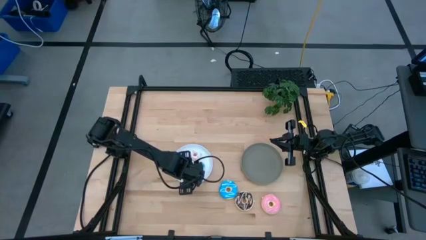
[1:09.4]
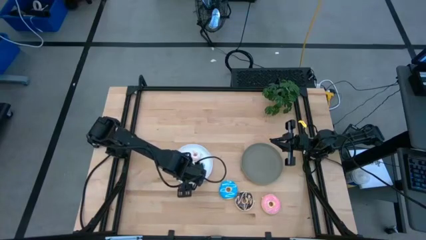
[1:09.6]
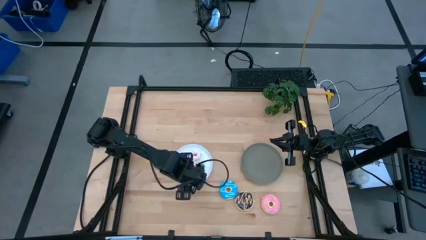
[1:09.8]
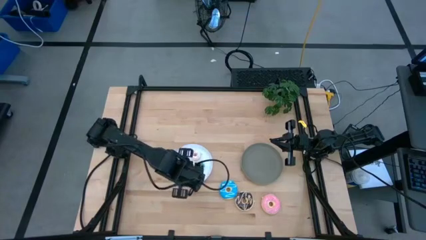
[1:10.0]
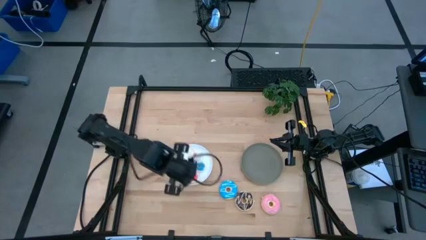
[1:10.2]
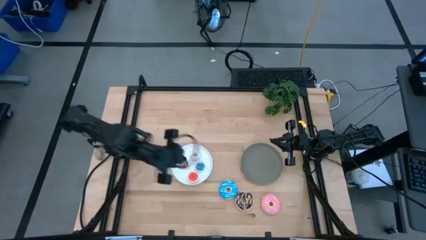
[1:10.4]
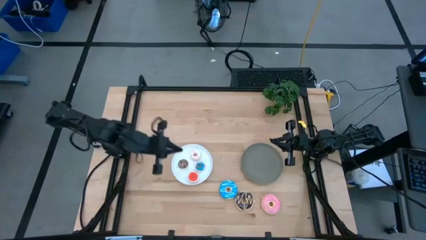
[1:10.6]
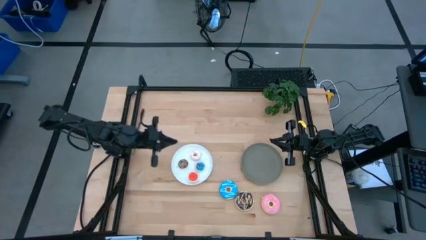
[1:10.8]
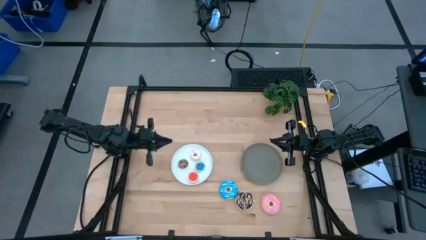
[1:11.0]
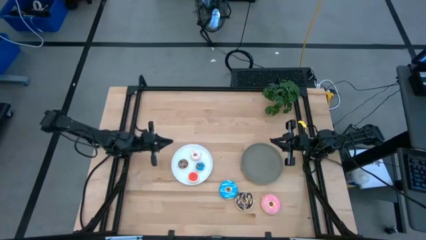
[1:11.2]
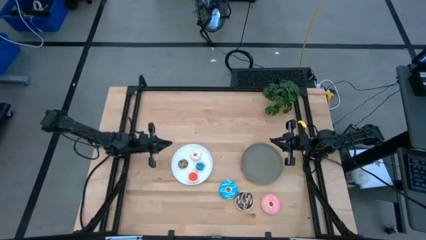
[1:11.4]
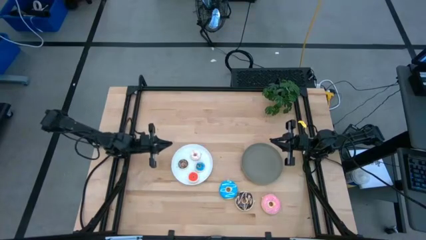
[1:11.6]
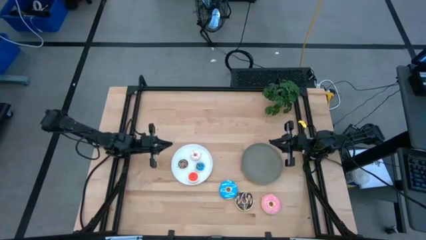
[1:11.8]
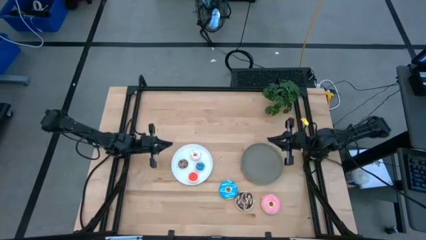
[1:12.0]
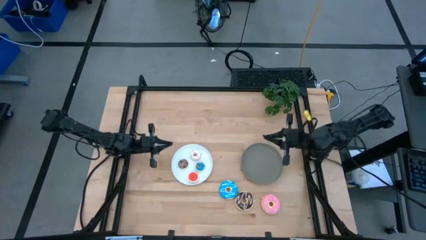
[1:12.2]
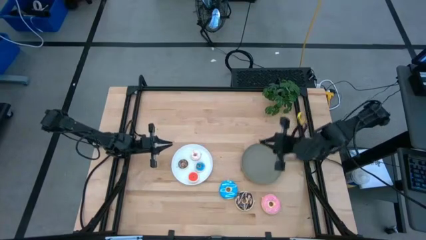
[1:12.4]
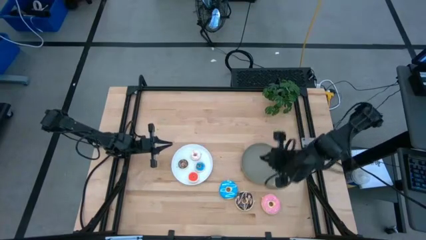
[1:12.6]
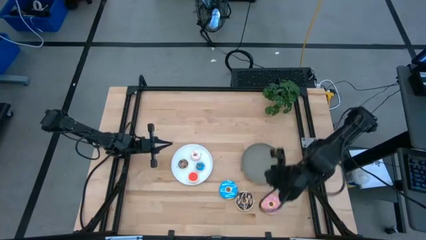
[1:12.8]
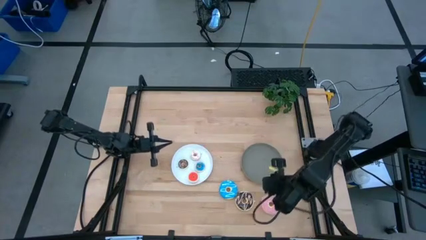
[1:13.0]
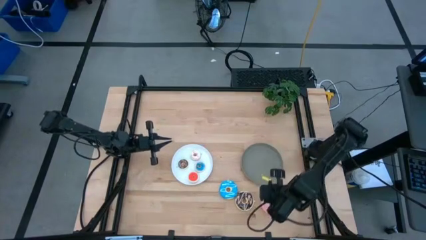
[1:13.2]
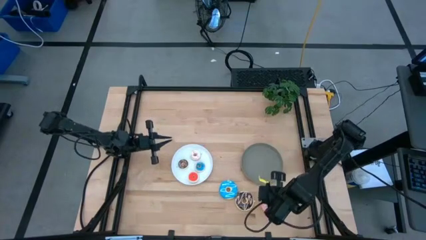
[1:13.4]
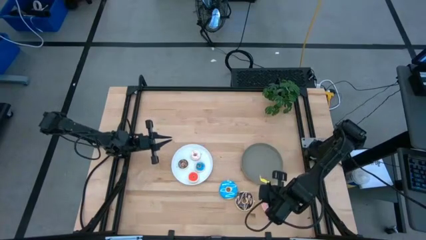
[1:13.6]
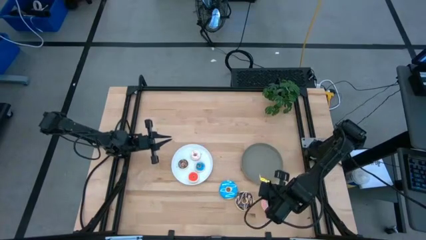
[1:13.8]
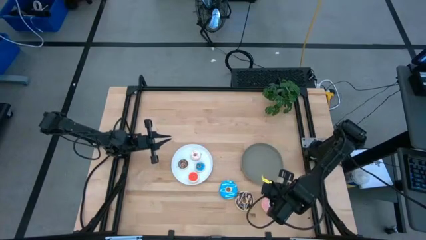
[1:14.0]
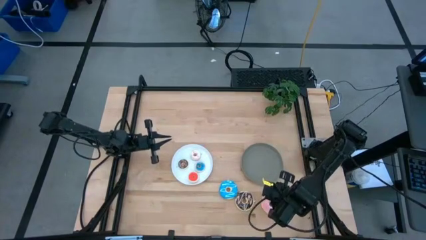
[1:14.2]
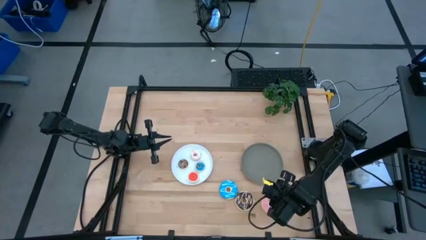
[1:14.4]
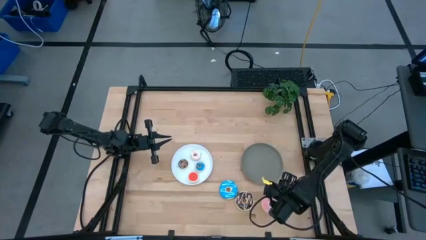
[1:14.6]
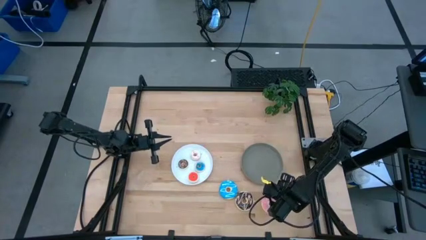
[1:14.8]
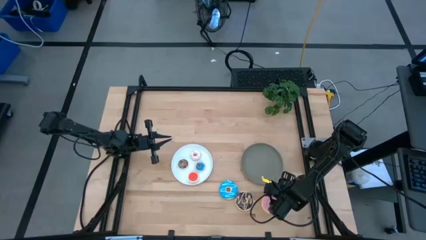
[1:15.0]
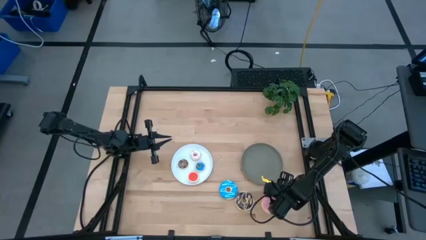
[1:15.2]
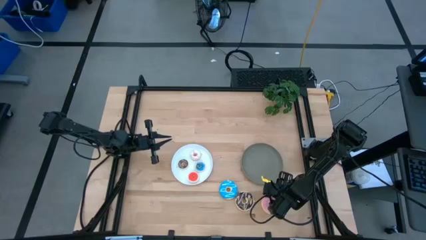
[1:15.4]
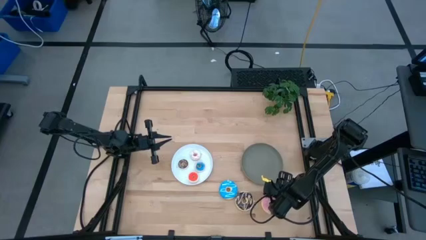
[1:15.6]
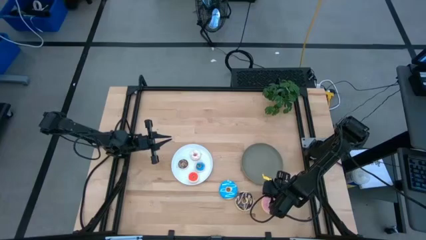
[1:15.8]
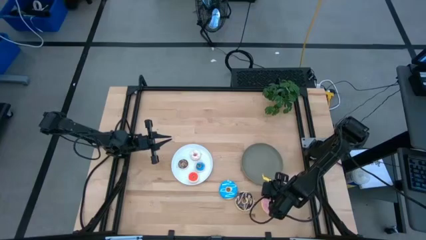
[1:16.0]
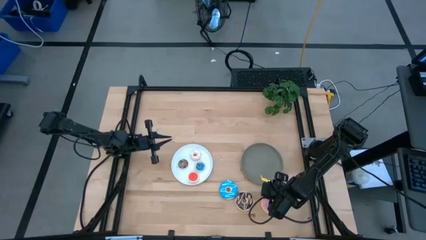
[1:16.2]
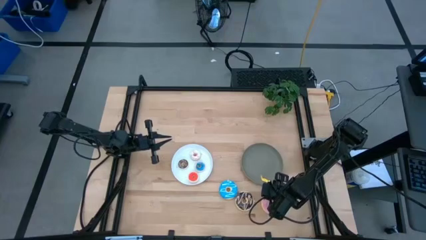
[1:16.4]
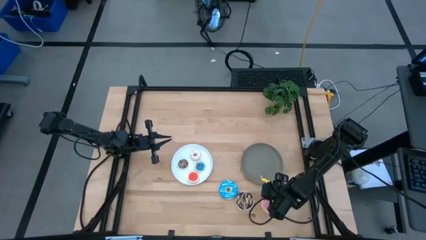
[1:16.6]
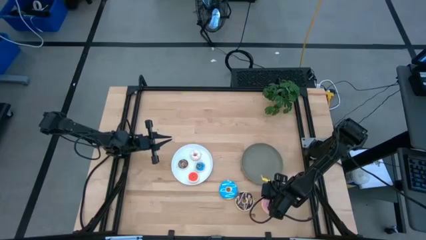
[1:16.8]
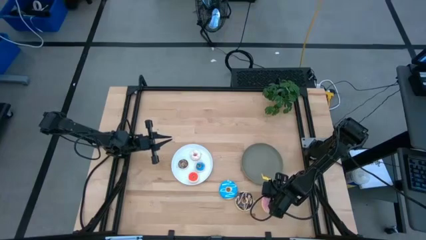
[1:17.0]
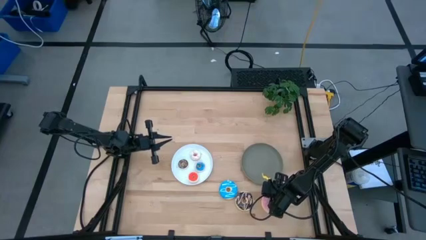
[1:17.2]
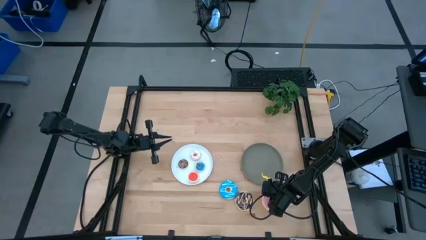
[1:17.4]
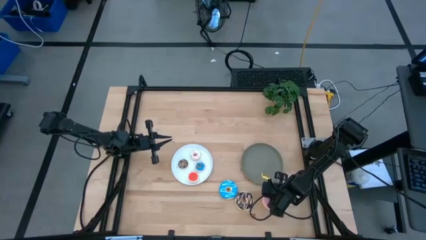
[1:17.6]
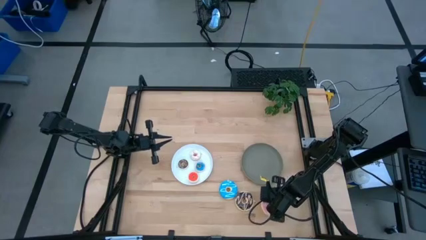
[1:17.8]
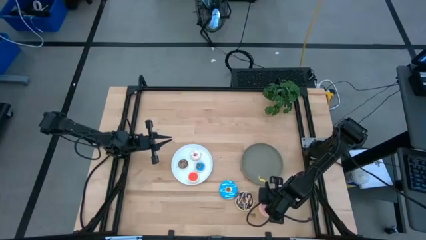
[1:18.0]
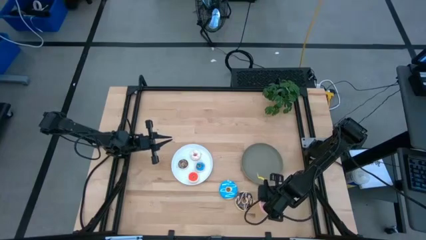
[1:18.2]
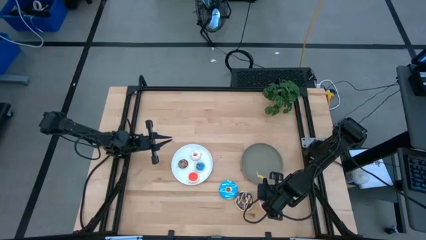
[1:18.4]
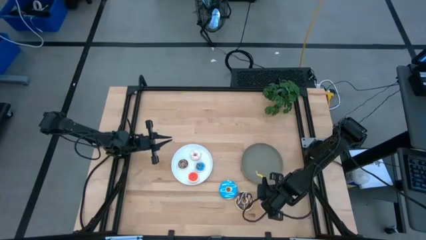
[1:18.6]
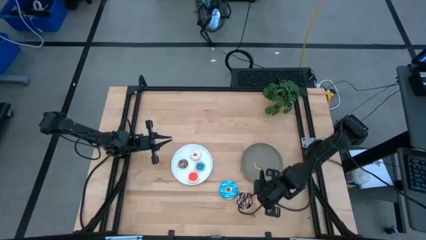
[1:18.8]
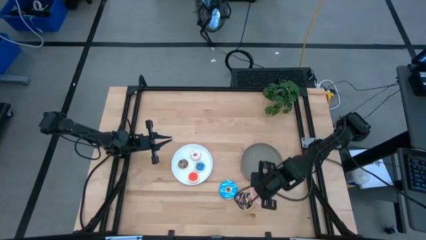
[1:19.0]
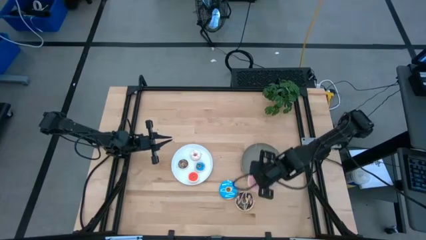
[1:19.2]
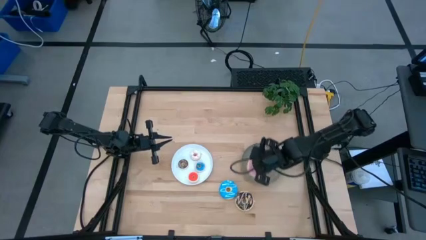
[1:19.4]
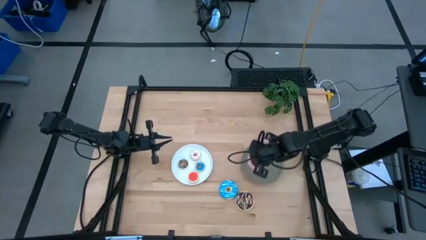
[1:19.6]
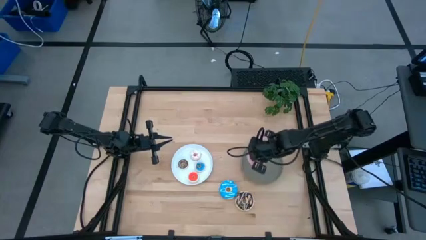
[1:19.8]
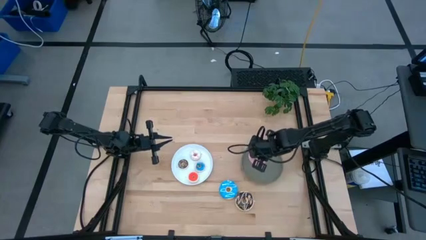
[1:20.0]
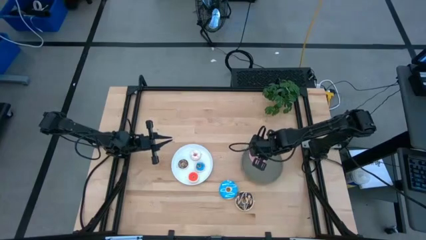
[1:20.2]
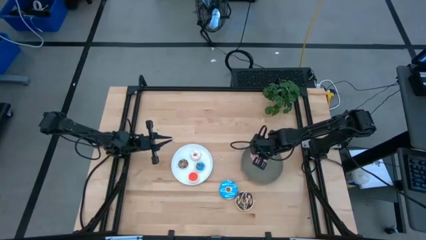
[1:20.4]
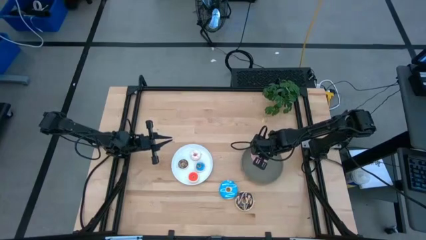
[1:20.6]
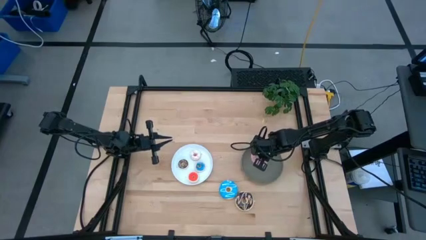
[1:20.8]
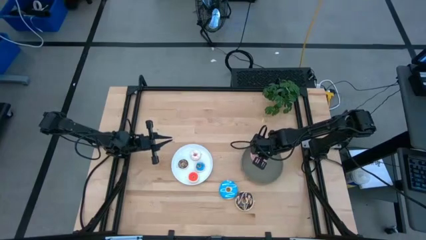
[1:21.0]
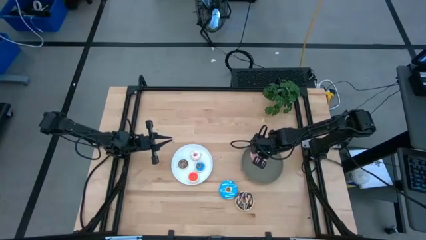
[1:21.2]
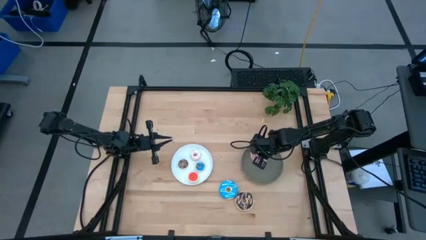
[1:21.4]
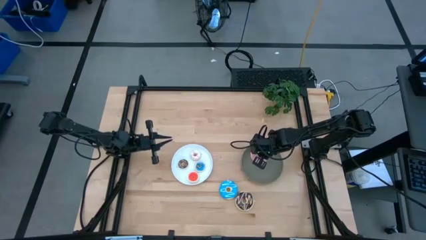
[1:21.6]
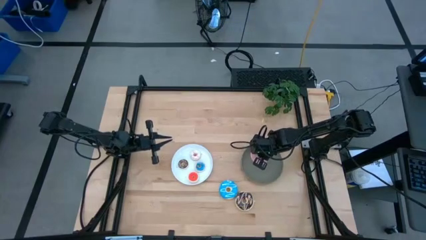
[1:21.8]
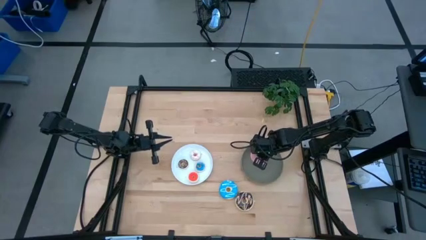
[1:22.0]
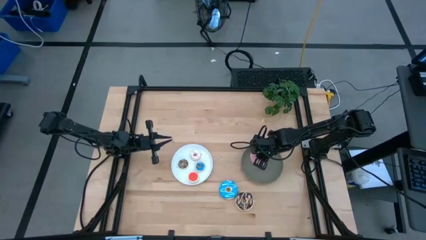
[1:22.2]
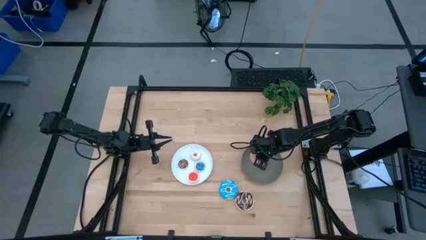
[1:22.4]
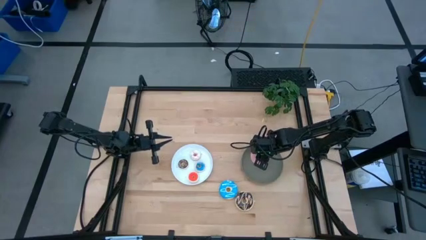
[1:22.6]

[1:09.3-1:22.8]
Task: Pick & Place donuts
Put the big pink donut on the green plate

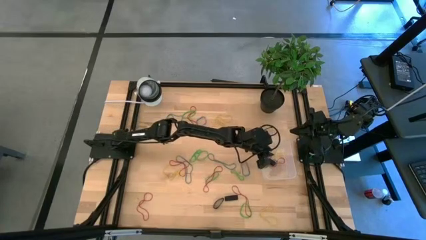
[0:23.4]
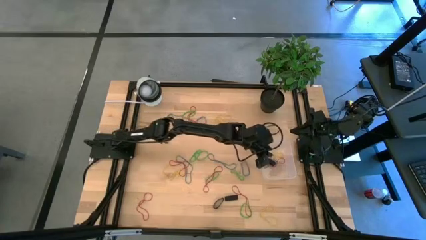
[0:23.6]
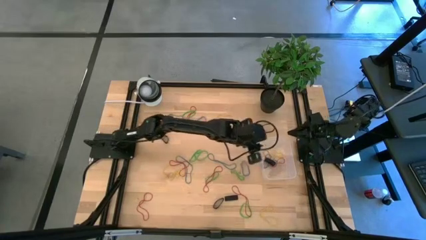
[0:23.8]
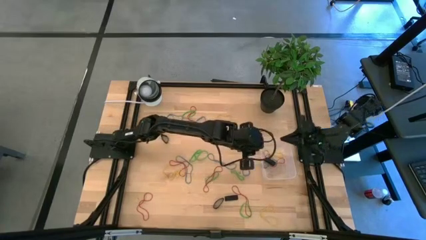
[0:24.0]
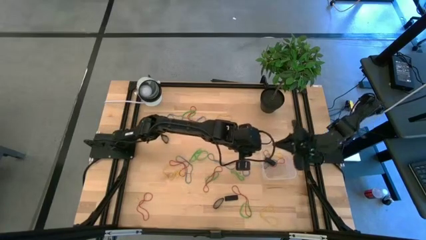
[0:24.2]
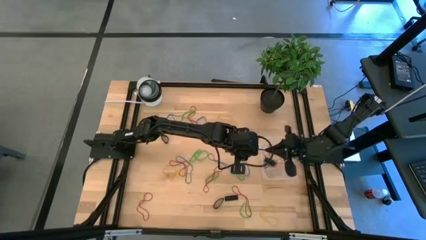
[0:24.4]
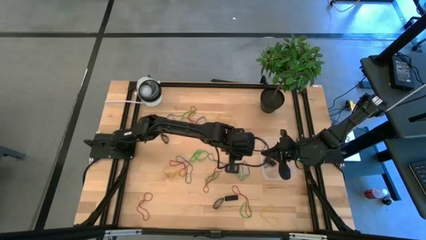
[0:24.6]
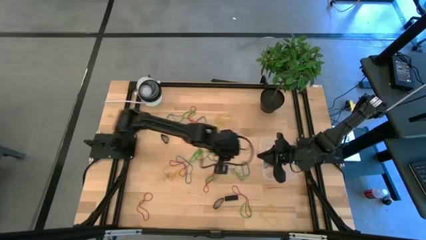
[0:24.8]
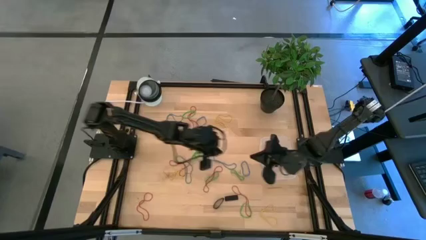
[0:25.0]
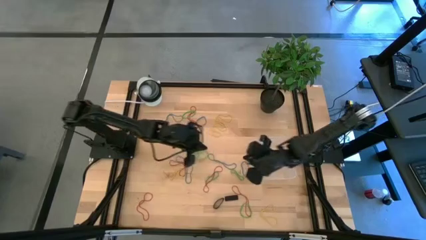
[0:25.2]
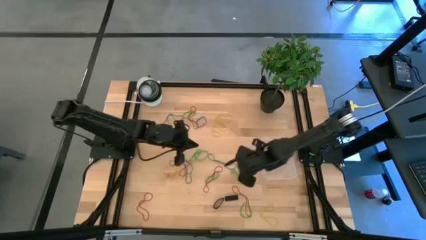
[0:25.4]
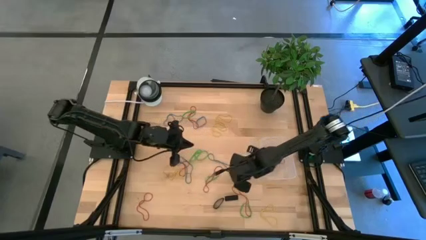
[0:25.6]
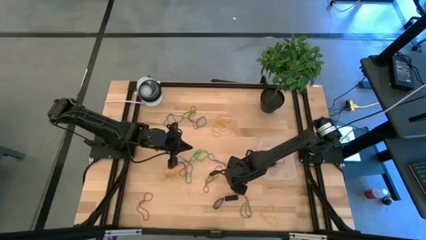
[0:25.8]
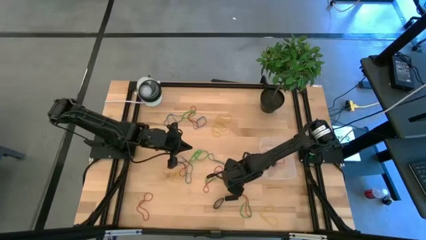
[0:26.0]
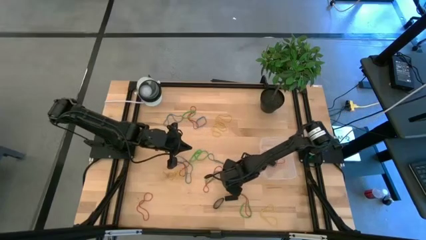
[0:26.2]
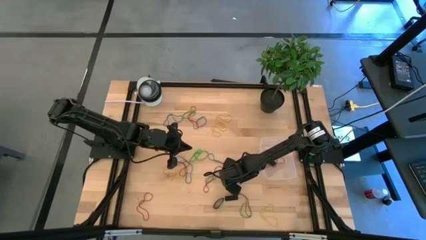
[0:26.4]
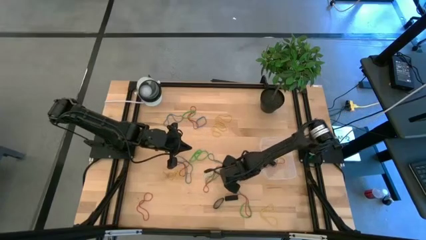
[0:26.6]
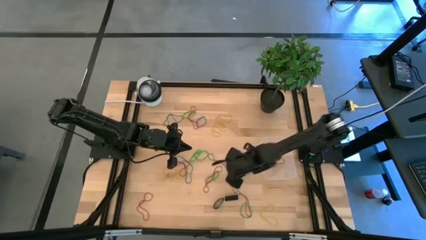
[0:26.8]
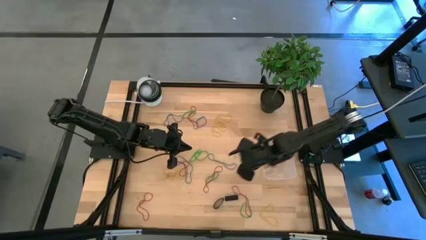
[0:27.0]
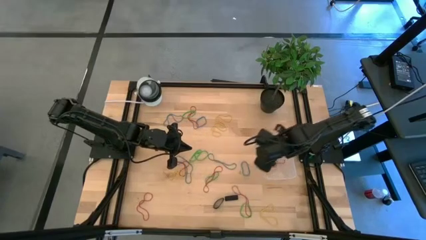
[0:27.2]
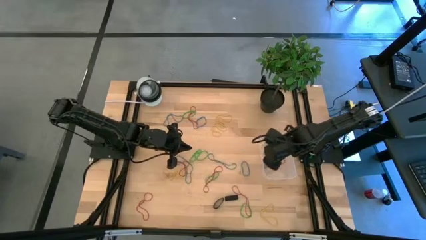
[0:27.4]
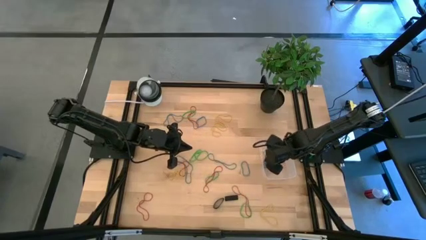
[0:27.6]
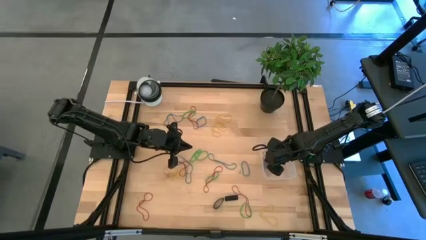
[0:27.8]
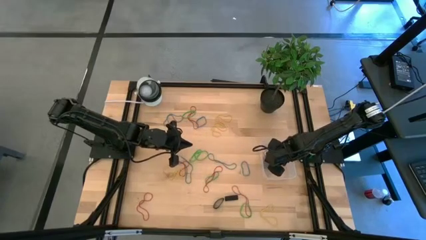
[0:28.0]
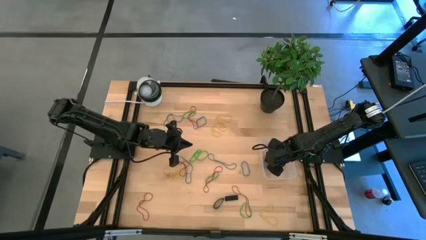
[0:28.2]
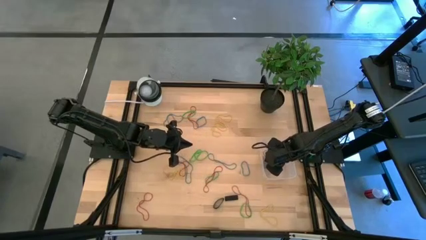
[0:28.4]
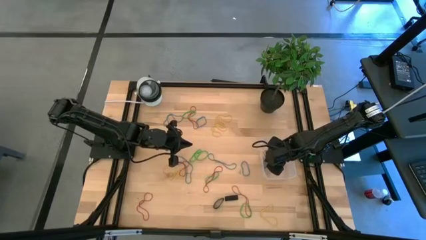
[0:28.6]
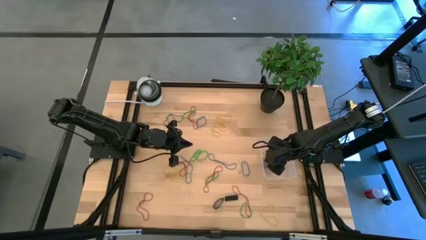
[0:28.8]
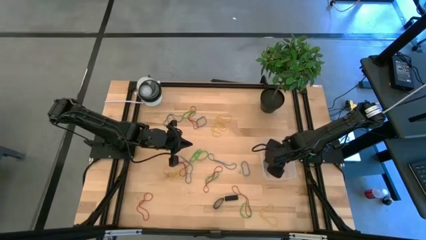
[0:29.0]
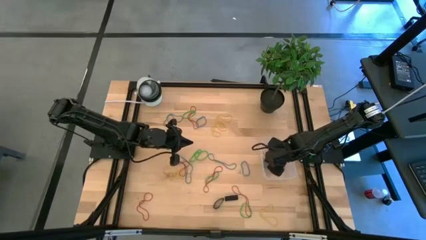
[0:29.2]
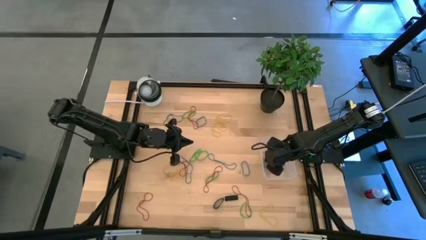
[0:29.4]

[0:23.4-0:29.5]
Task: Pick and place rubber bands into bin
Put the green rubber band into the transparent bin
